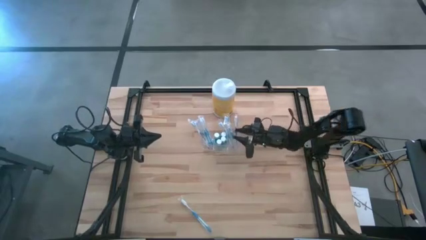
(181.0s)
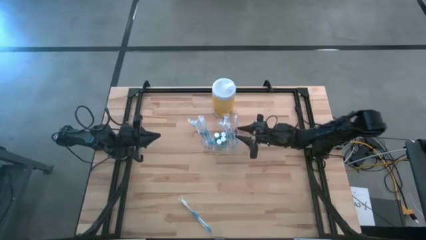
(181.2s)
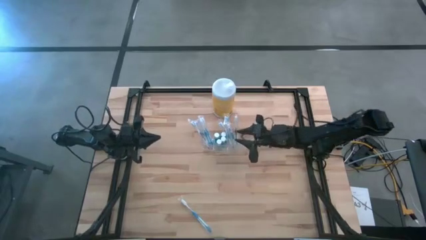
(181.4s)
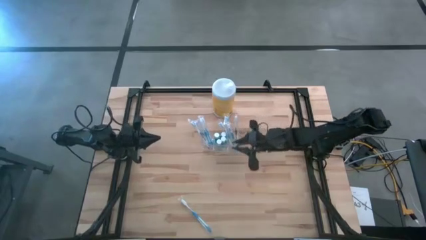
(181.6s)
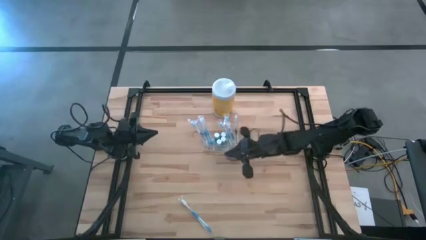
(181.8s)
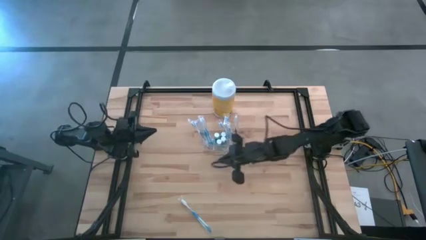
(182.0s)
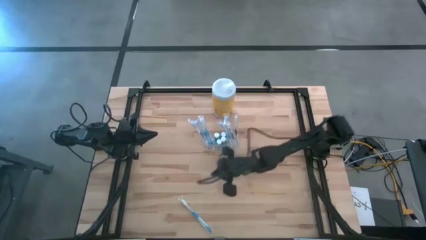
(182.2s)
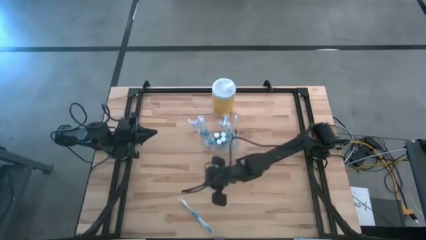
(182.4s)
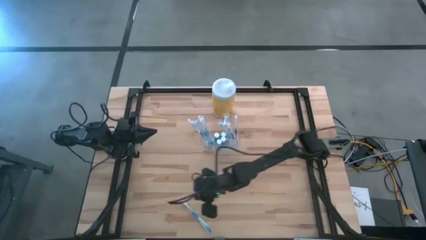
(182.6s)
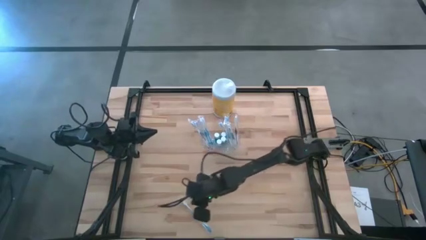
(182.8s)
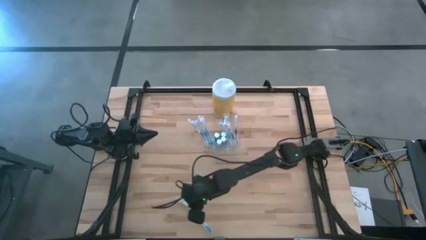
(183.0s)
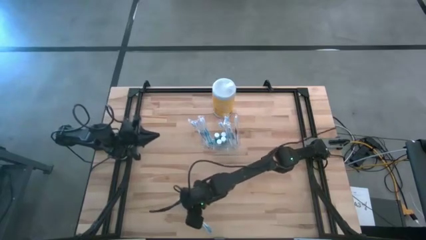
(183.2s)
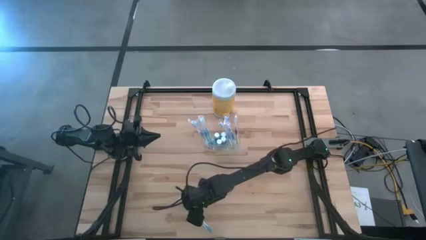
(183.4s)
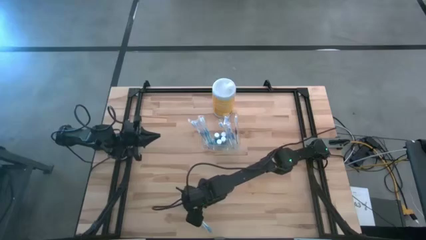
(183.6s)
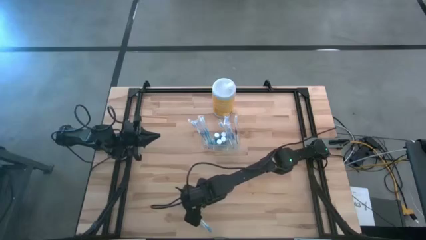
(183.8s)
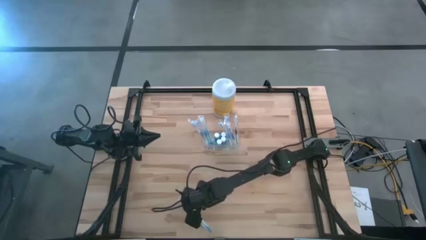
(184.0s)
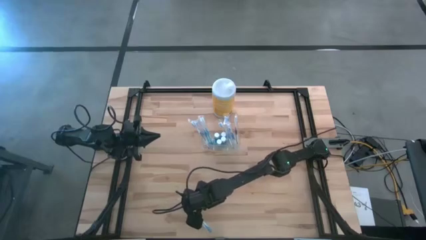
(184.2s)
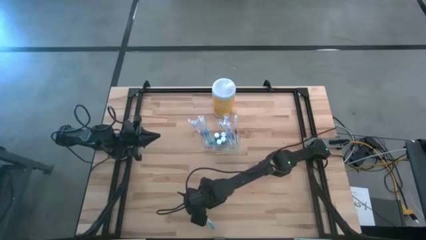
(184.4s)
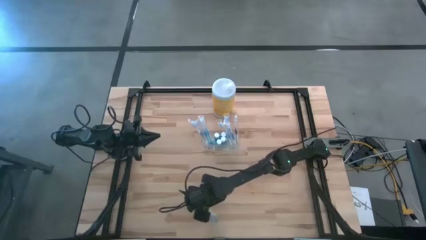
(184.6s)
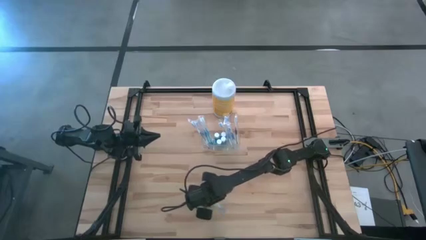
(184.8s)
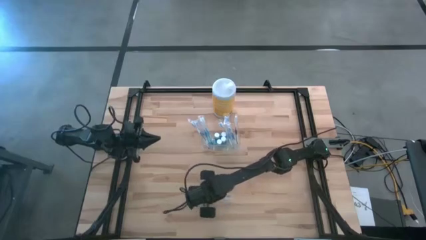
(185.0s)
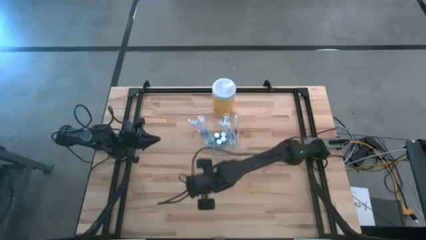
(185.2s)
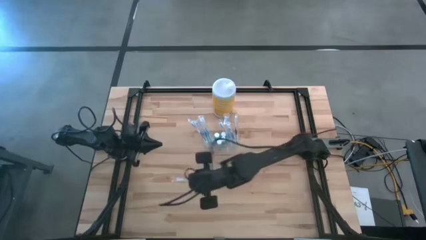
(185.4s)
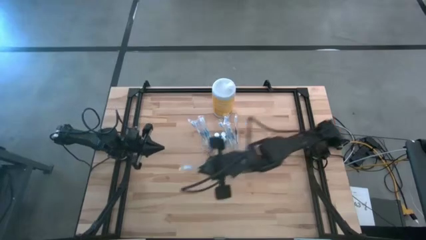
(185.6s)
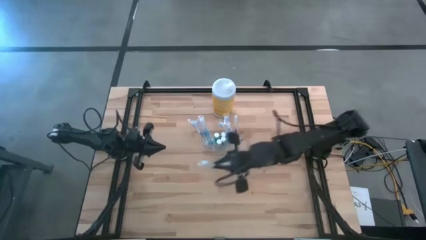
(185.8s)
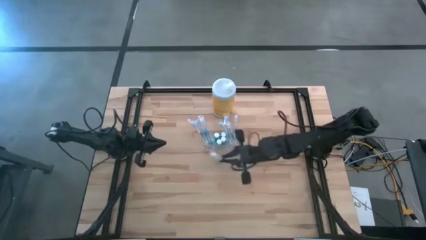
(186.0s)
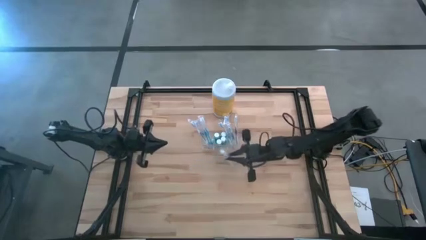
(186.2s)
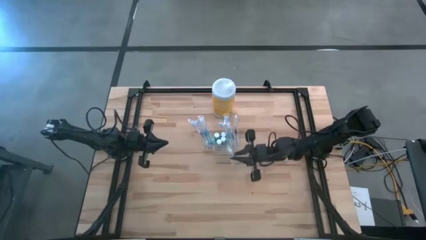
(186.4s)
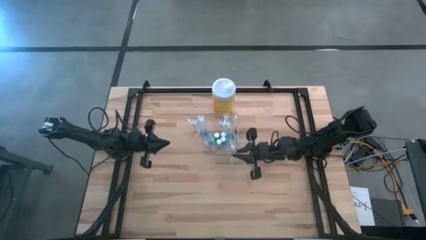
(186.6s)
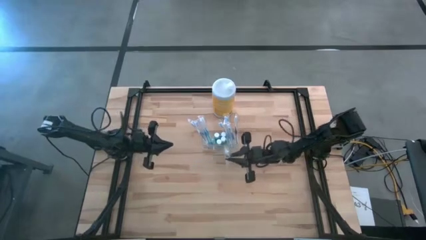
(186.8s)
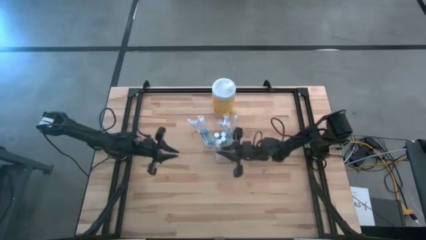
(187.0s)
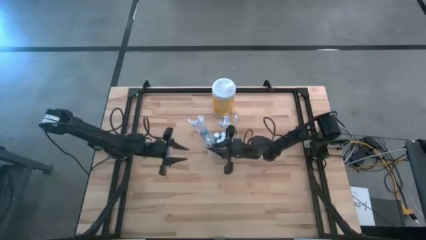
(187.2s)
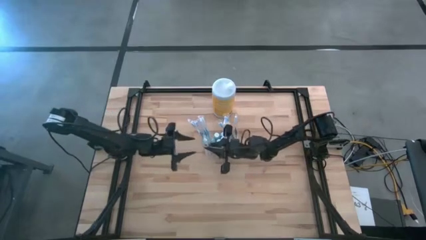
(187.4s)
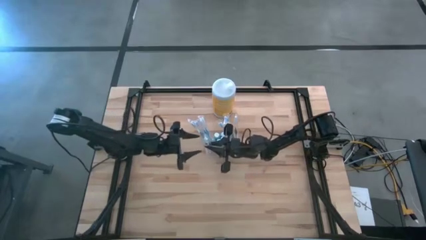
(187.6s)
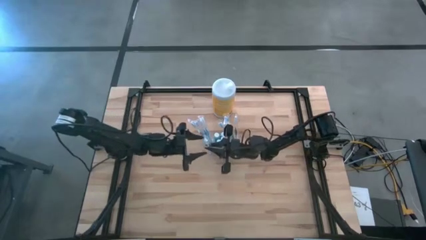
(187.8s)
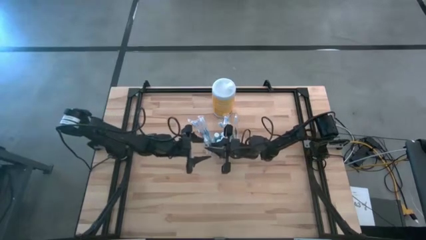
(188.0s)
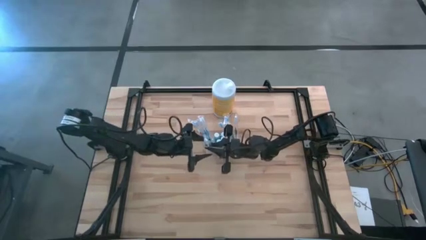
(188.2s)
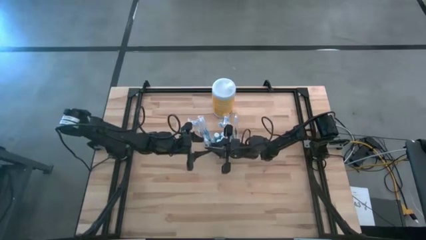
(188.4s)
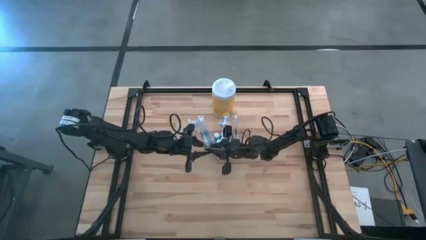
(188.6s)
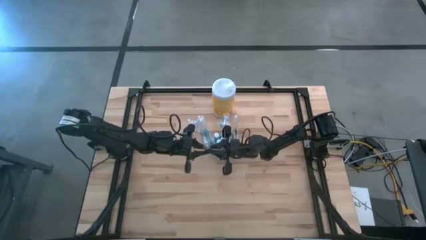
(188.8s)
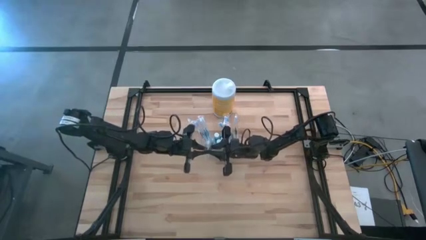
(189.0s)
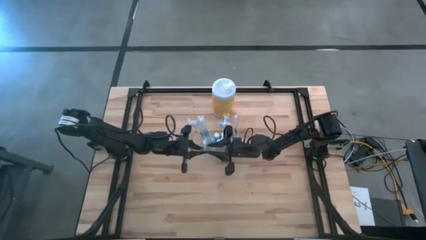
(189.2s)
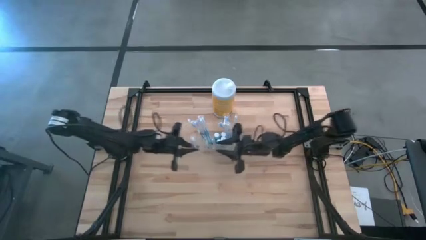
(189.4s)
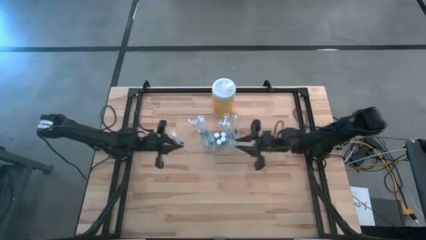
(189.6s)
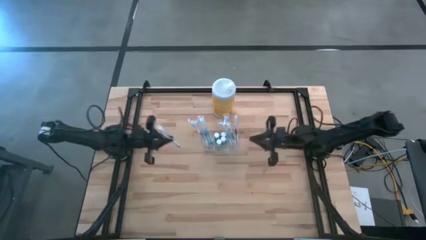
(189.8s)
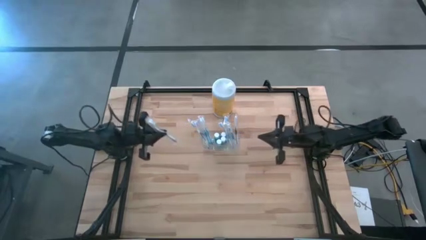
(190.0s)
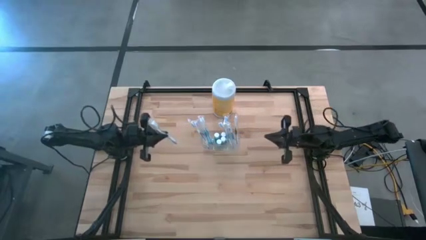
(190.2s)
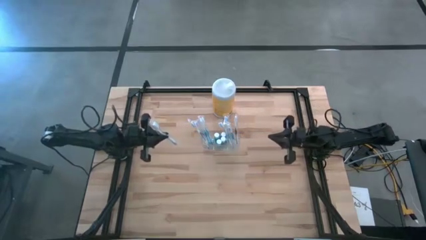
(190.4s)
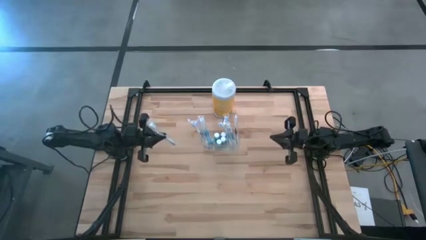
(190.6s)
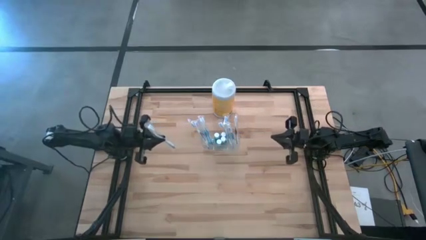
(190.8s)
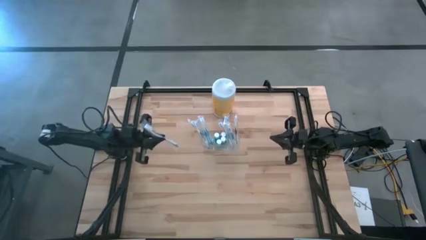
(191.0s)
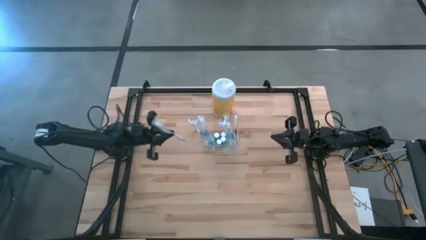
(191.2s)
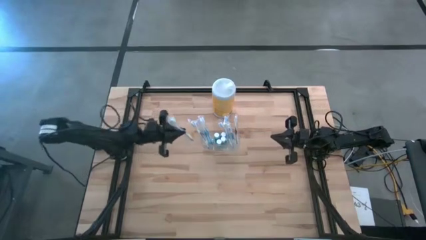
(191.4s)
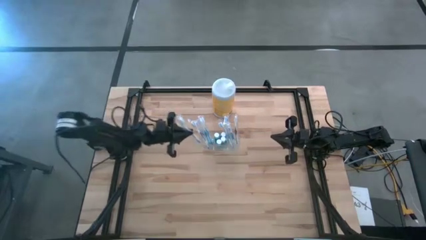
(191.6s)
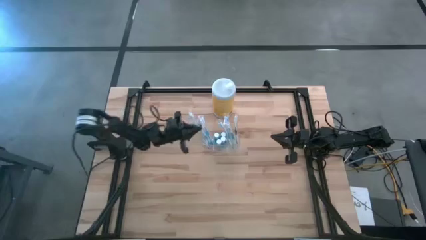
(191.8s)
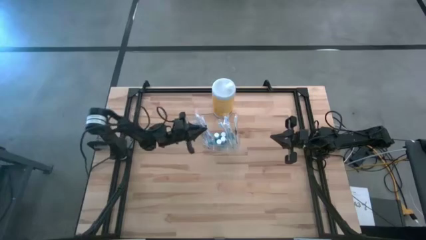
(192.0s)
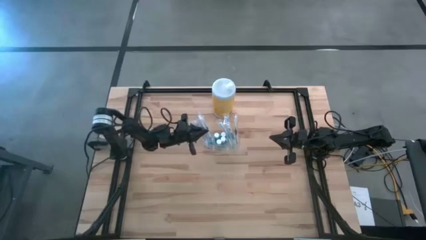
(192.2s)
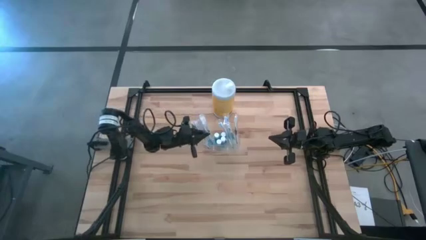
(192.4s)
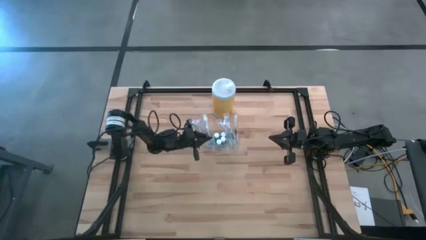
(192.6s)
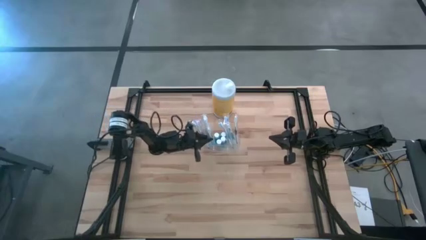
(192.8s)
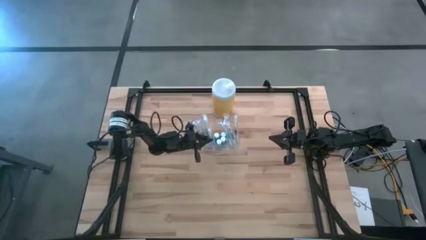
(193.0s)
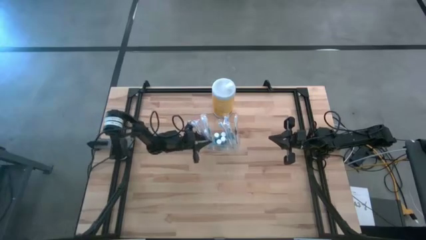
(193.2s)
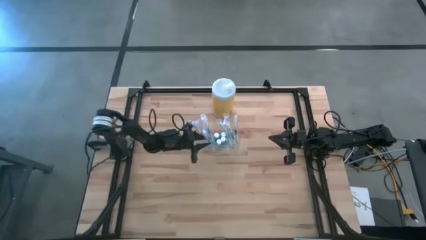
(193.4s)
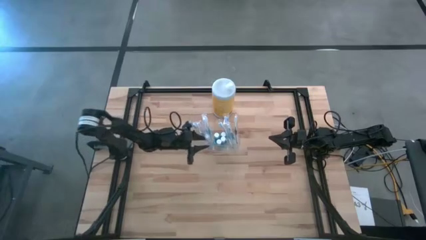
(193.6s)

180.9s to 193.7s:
Task: Pick & Place toothbrushing station
Put the blue toothbrush into the transparent organizer

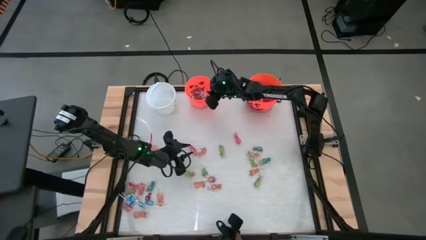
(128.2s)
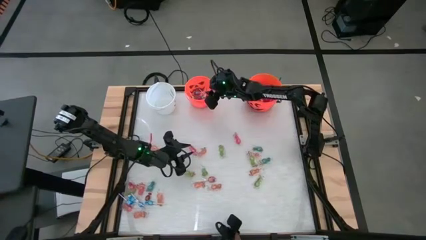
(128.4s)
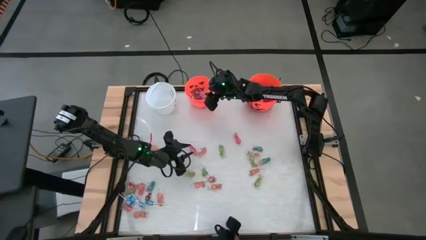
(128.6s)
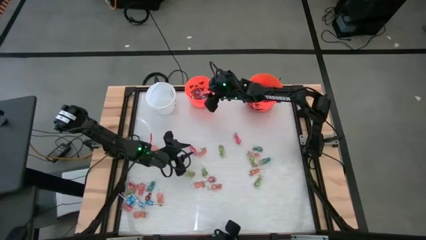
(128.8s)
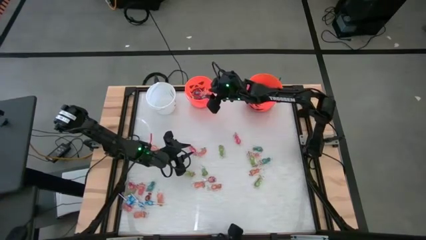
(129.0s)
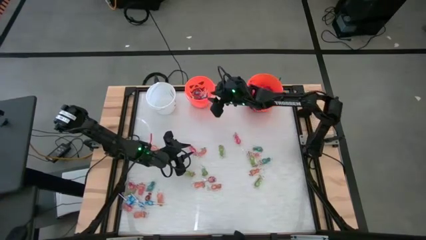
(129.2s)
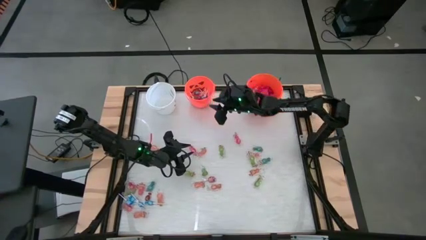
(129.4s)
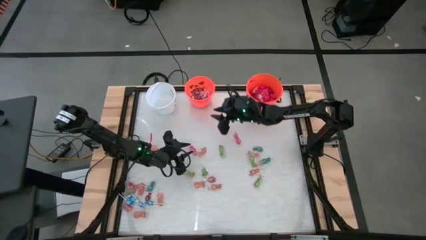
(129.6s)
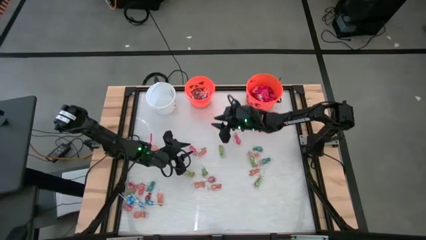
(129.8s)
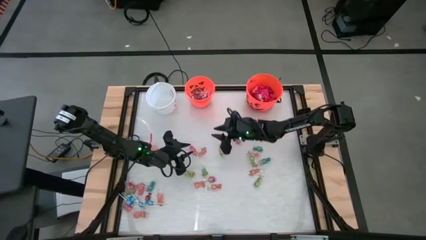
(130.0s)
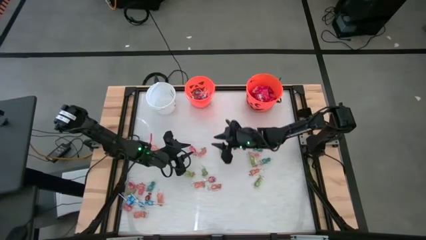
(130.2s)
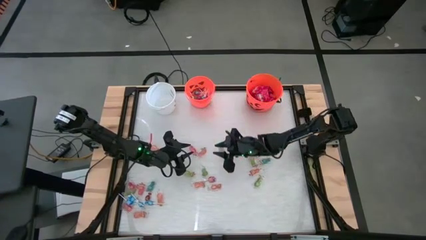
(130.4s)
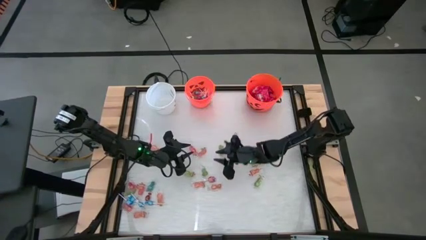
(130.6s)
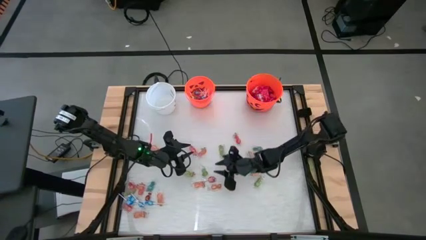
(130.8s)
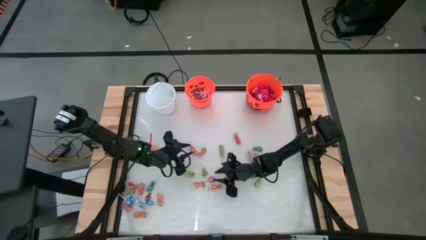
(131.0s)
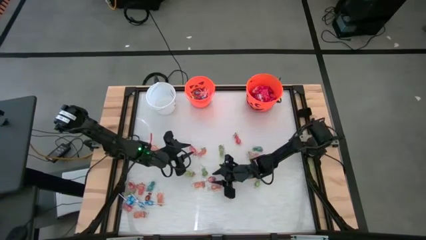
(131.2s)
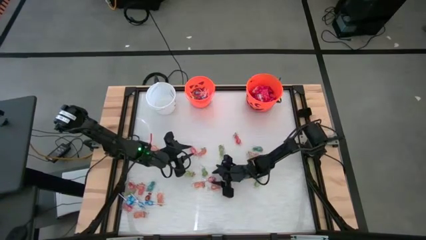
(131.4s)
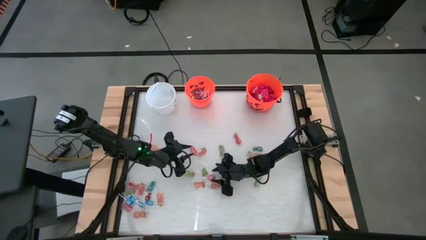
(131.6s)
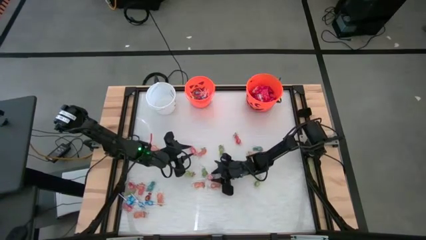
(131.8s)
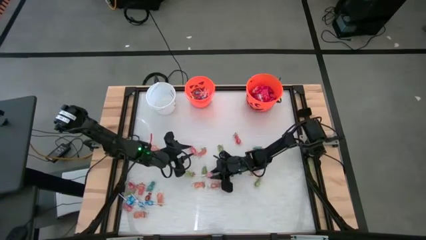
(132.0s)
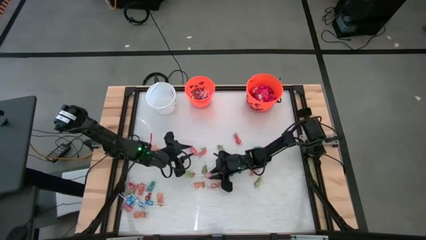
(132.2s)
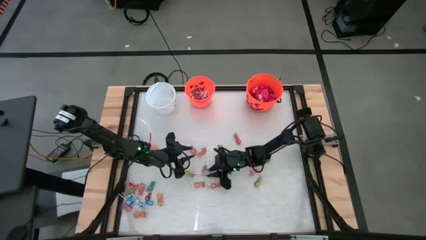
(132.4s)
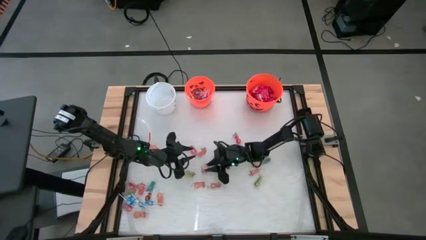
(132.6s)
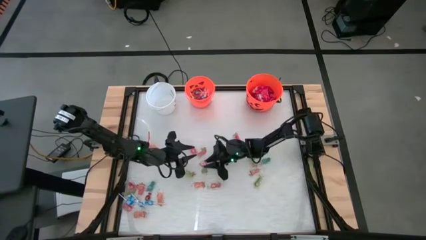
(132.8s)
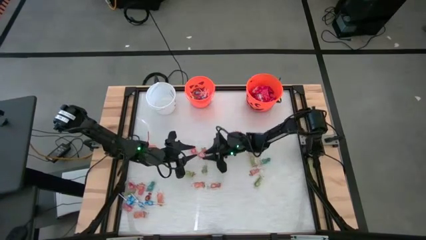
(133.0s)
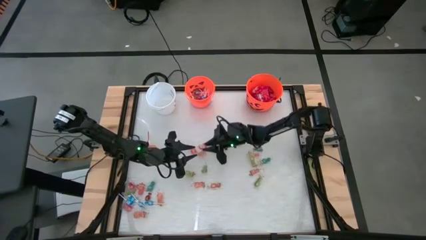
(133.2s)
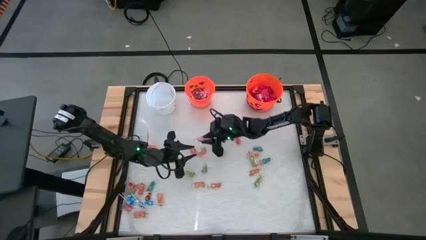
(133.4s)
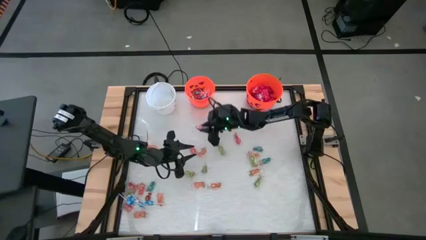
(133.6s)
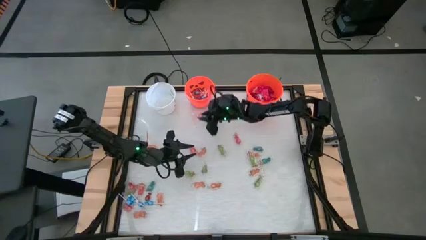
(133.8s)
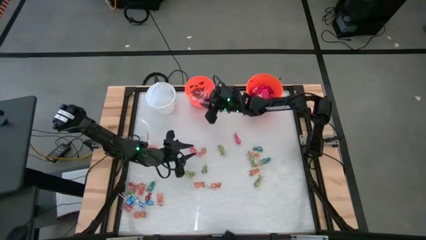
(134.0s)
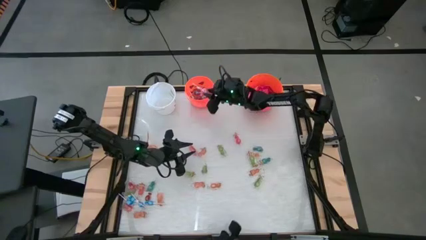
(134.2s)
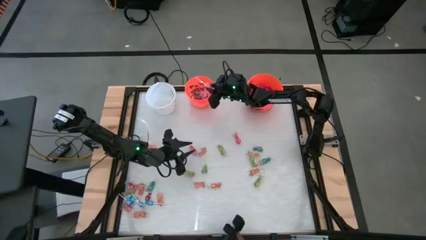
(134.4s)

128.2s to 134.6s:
Task: Sort candy by brand, put in halloween buckets
Put the pink lollipop into the left orange bucket
